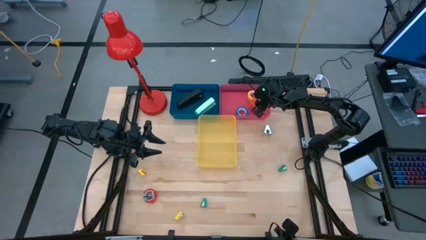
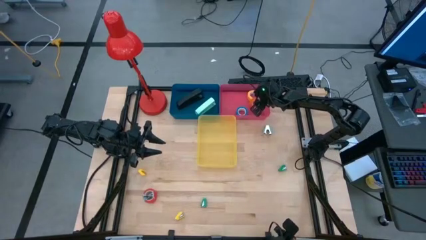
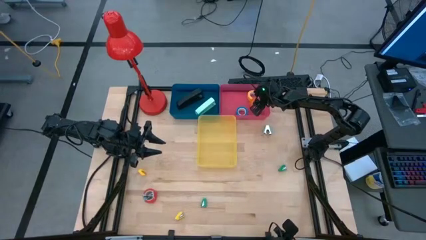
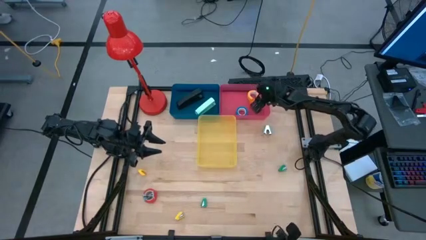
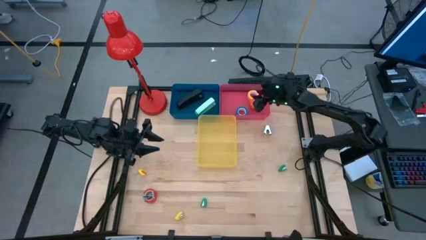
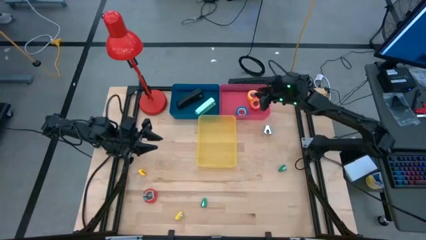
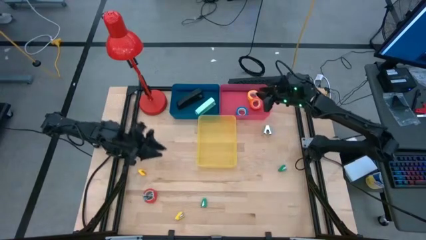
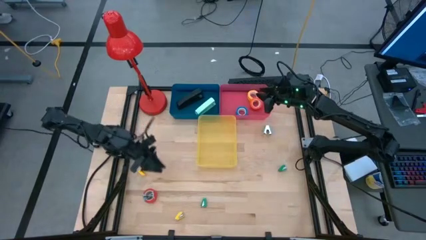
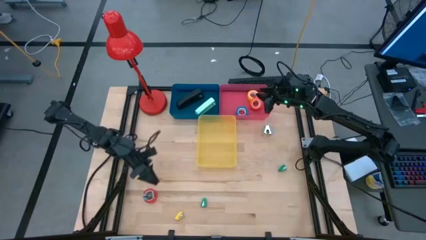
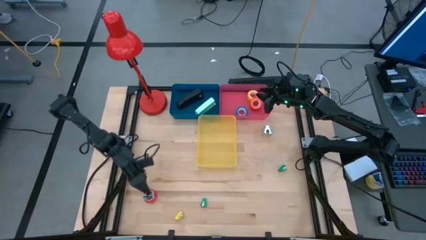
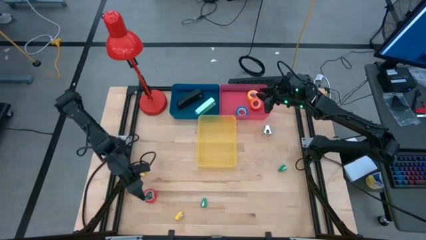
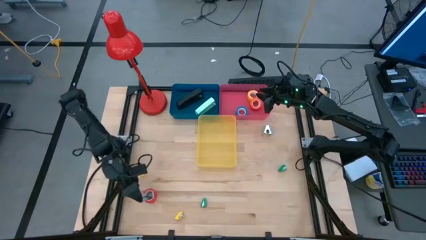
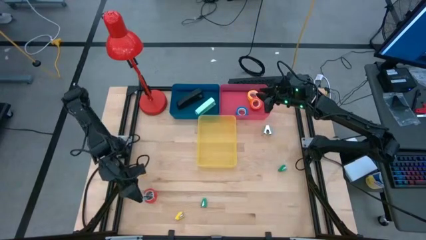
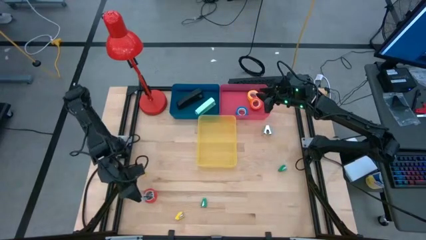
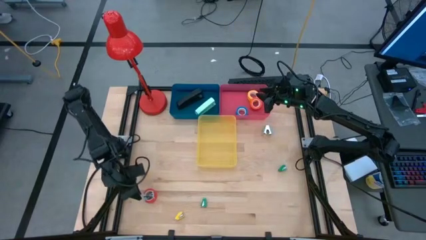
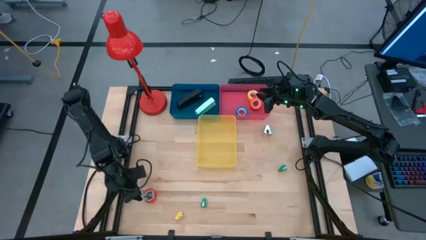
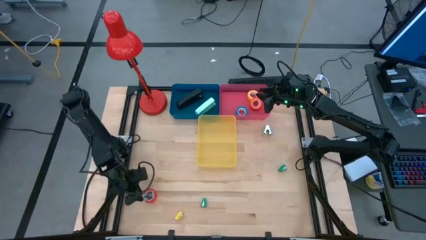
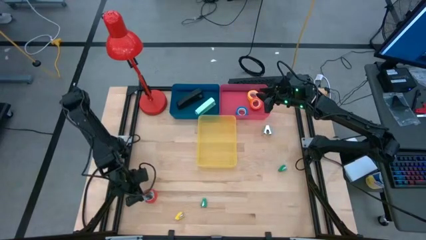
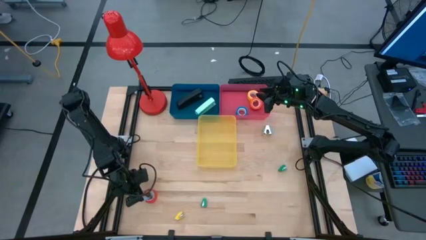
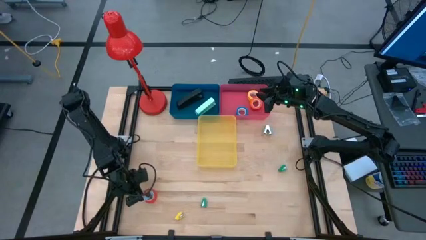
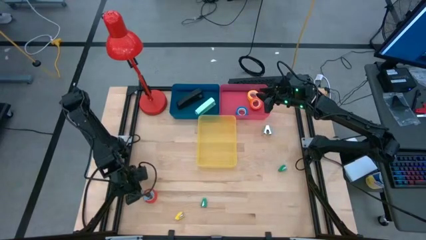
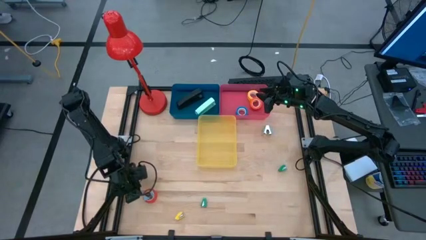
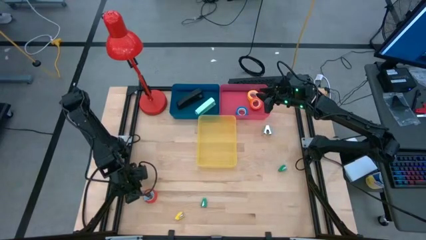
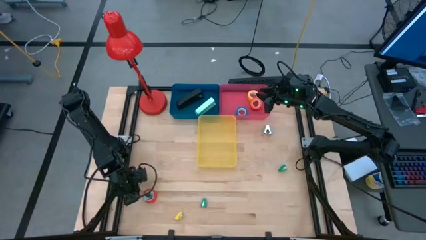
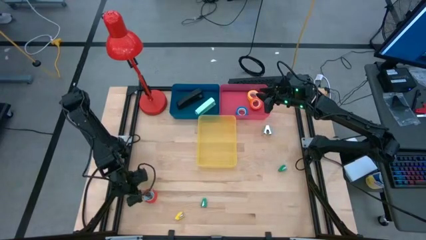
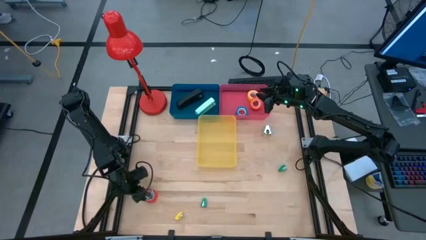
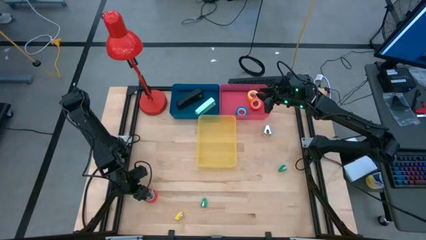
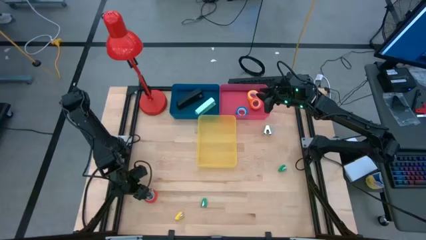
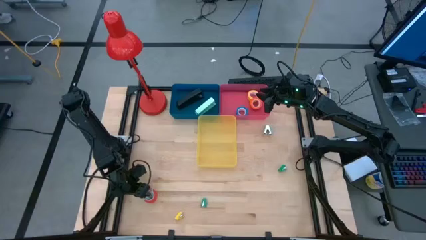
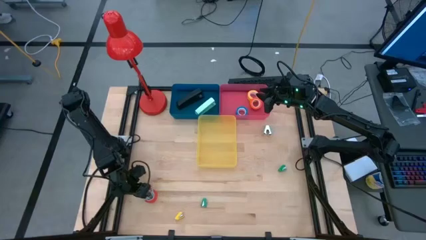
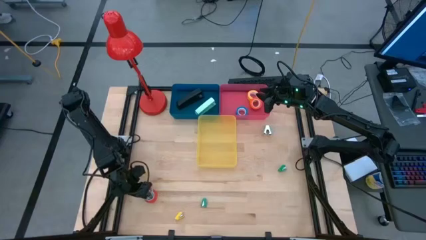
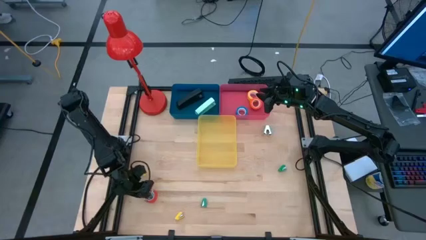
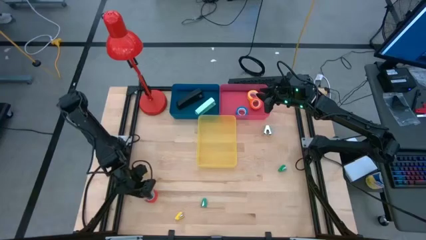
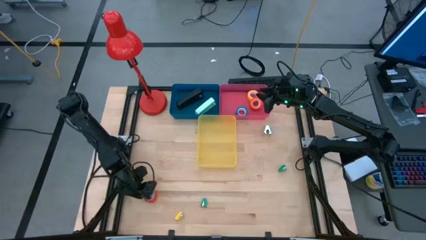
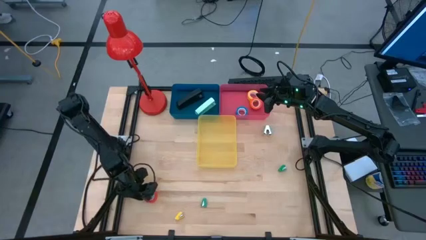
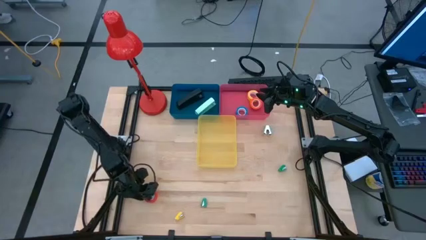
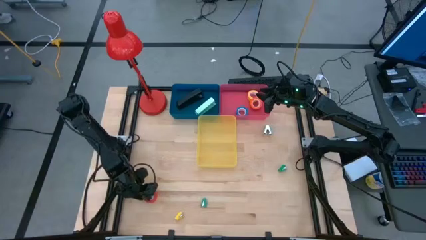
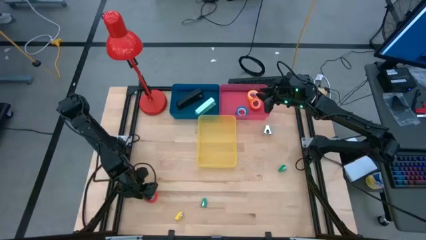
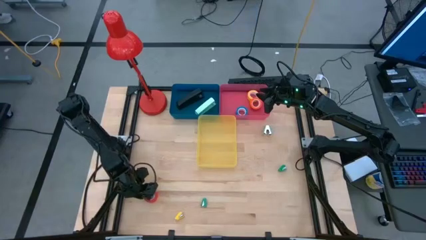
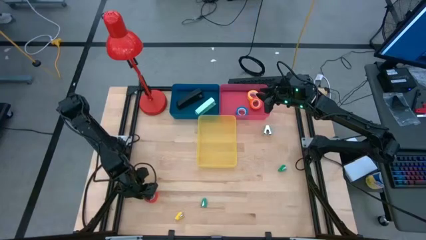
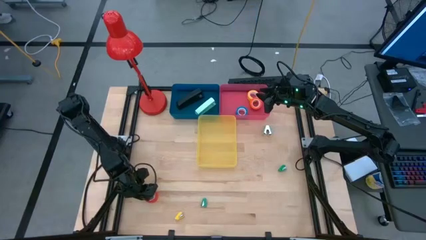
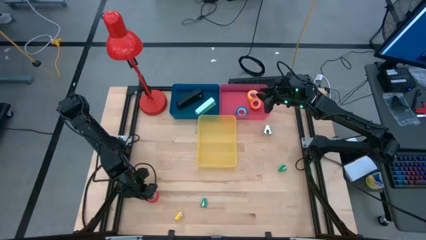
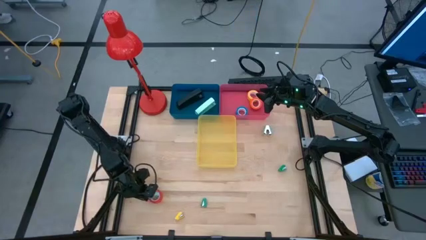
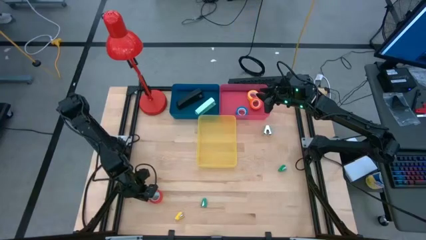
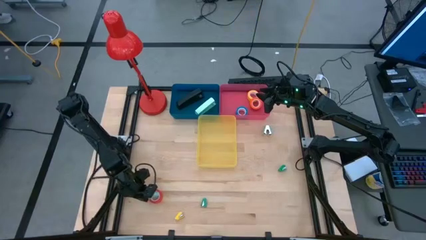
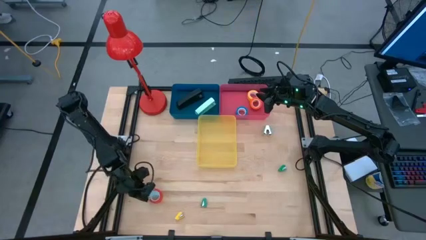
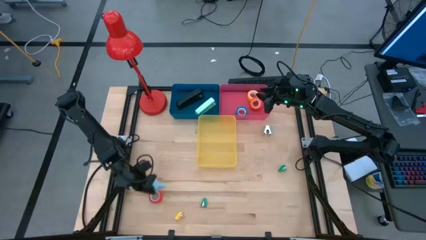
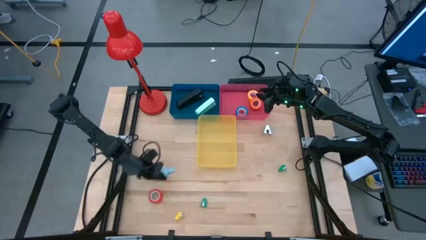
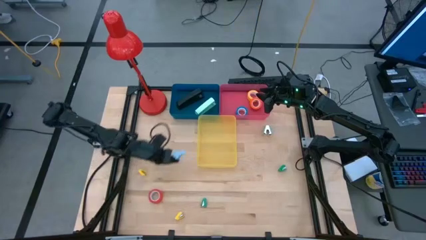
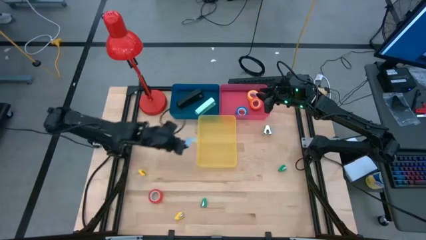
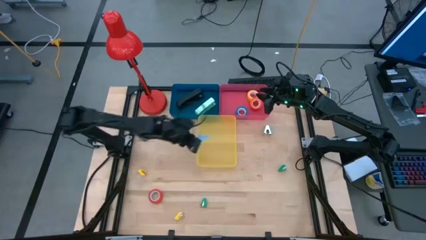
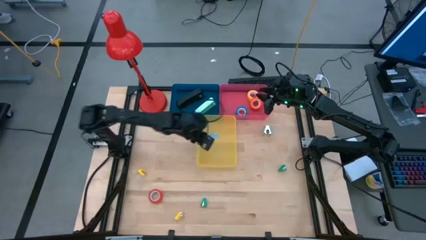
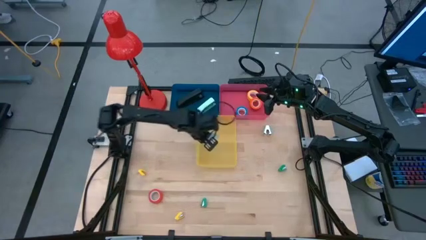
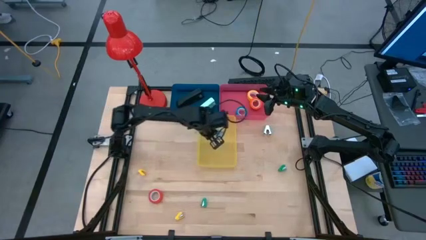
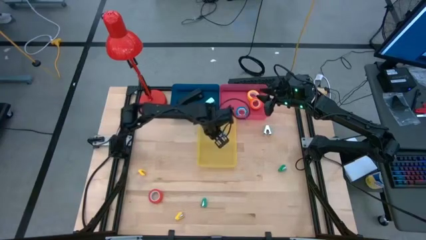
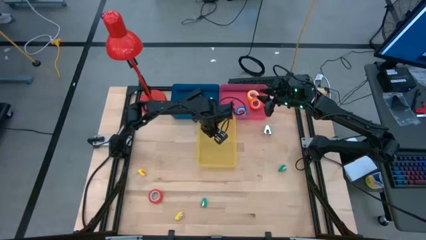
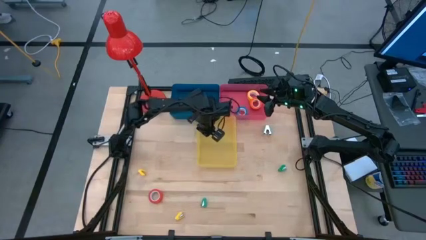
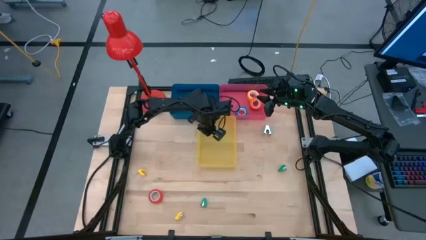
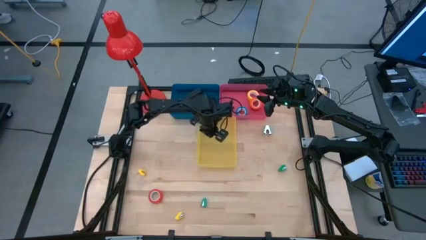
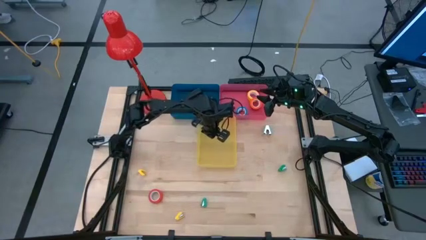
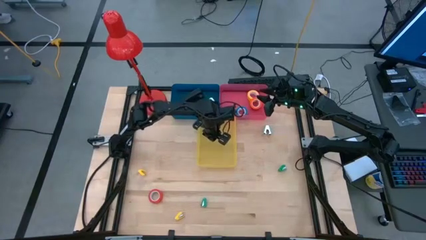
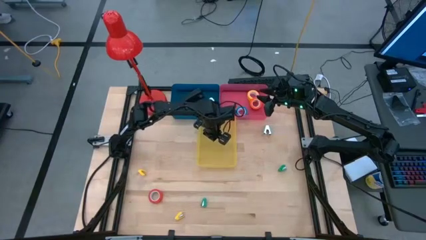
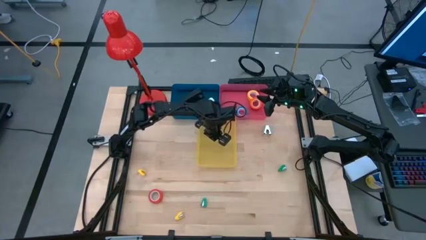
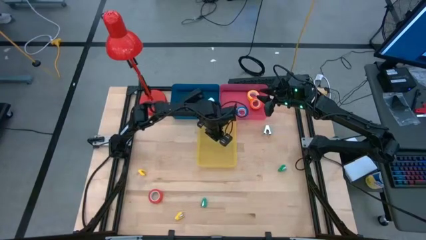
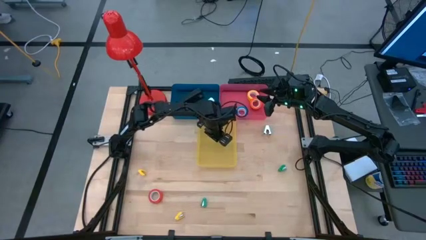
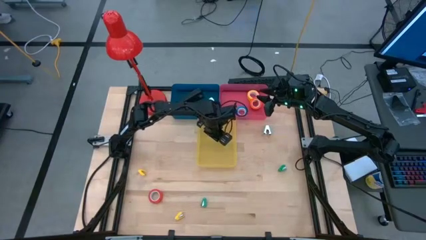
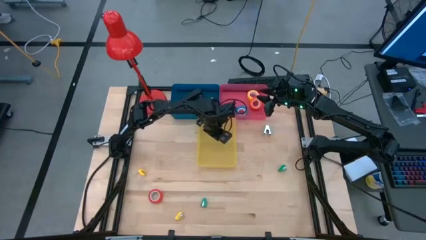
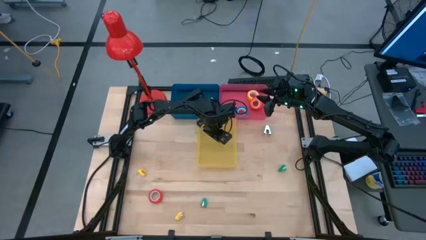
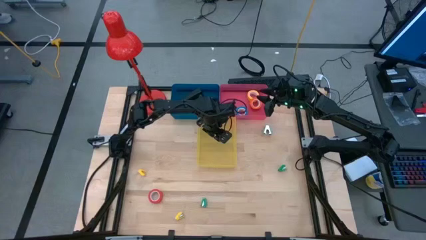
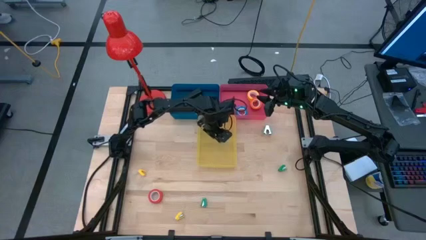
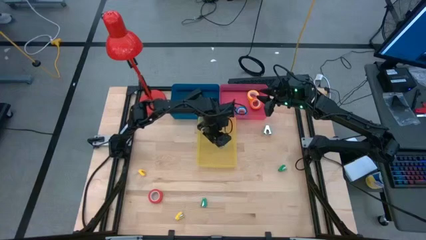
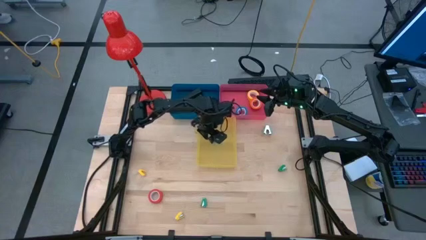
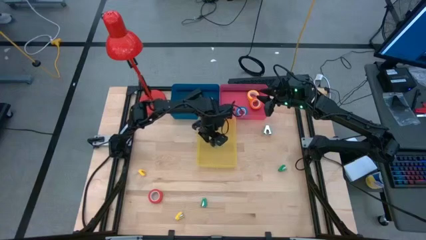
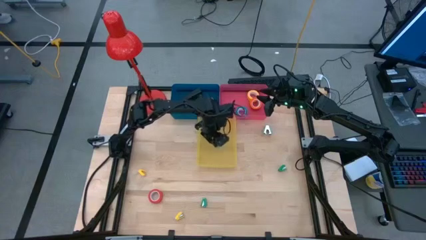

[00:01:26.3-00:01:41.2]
Task: Pick and place Stapler, Stapler remover, tape
Put the bottom light blue staple remover into the yellow bin

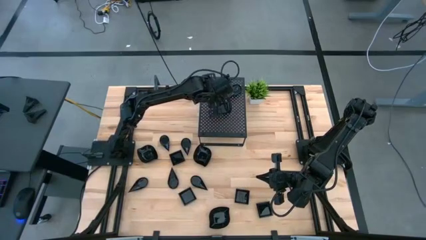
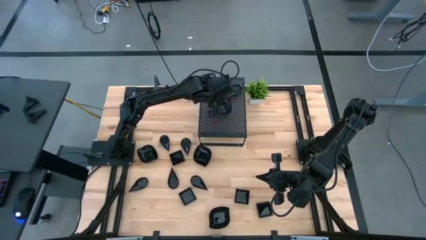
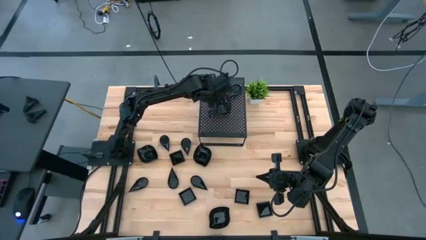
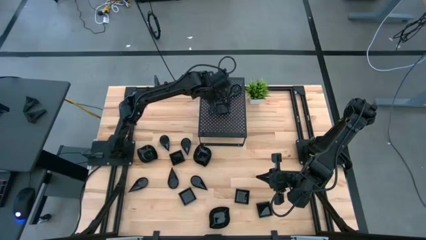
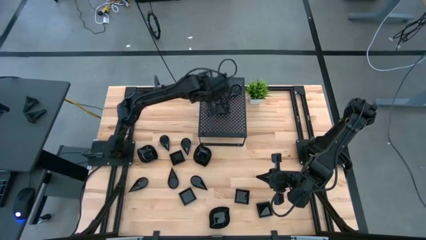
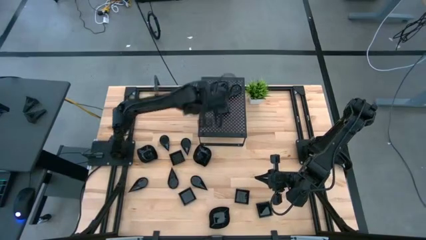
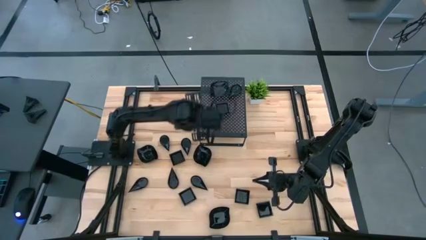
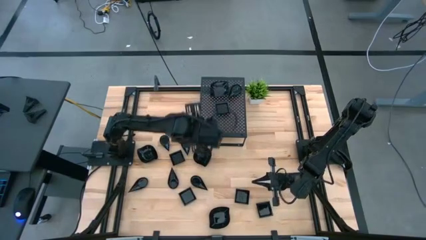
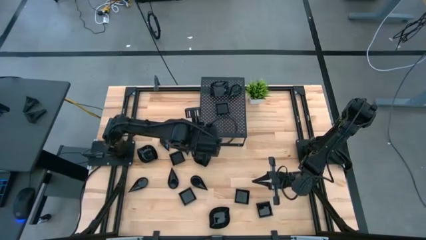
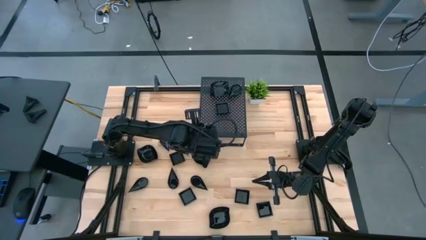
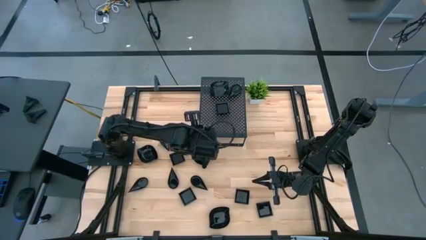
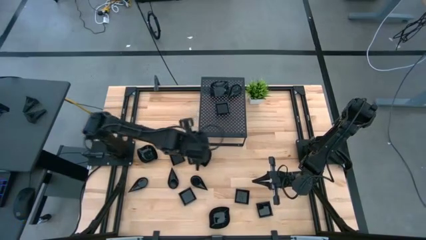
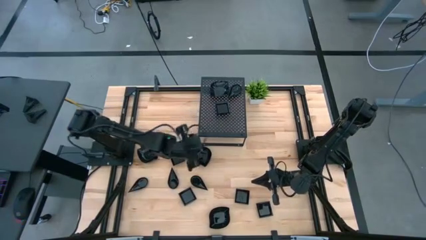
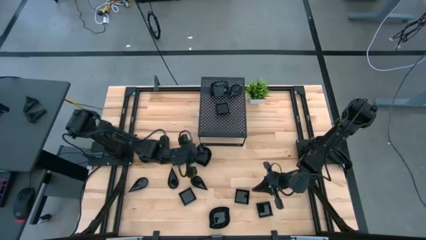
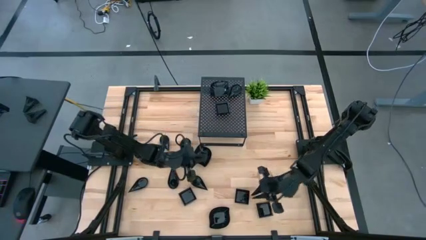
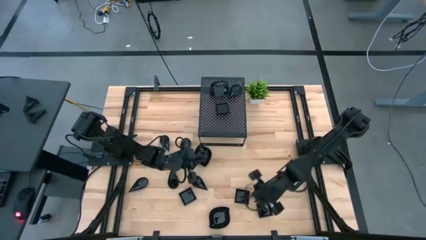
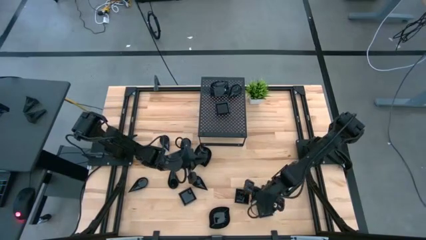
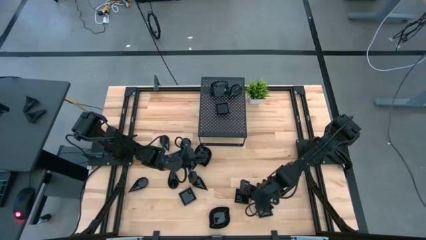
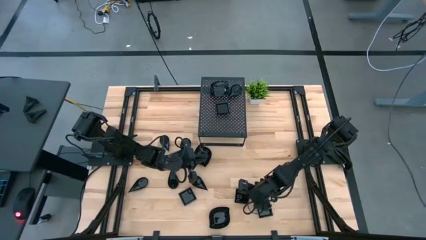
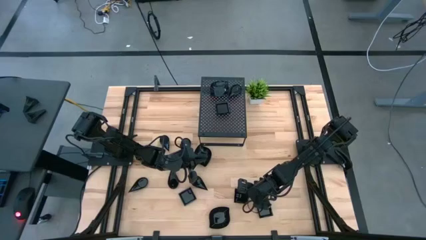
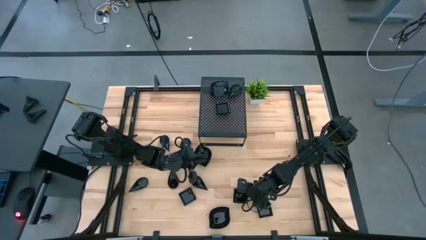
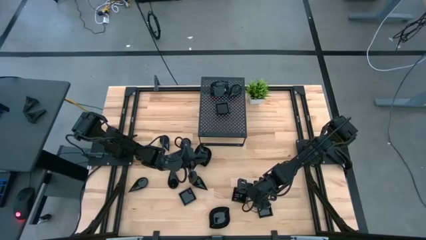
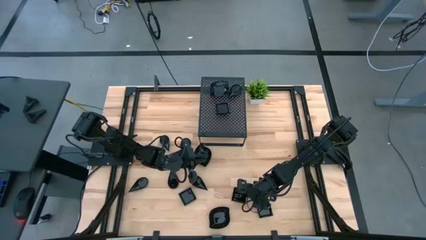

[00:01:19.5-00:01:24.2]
Task: Pick & Place Mini shaped plates
Stack the black square plate on top of the black square plate on the shelf
